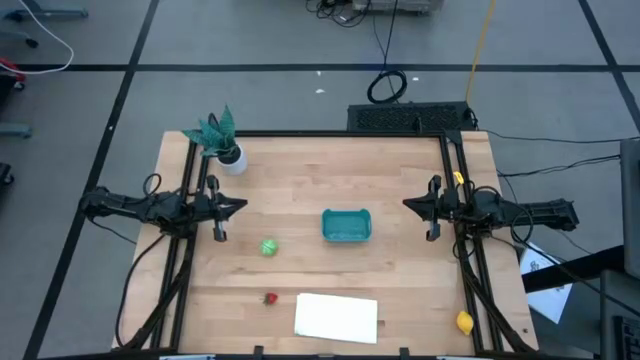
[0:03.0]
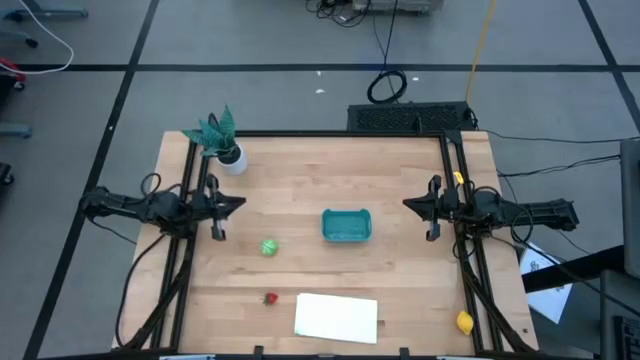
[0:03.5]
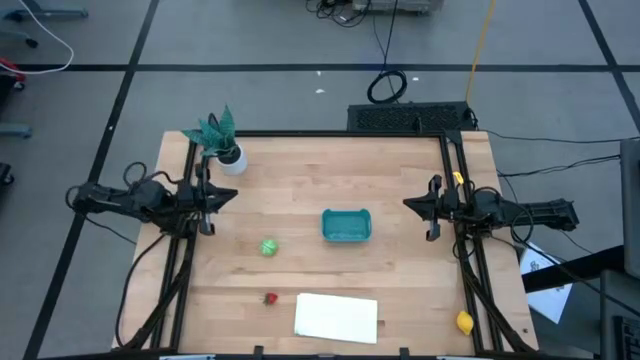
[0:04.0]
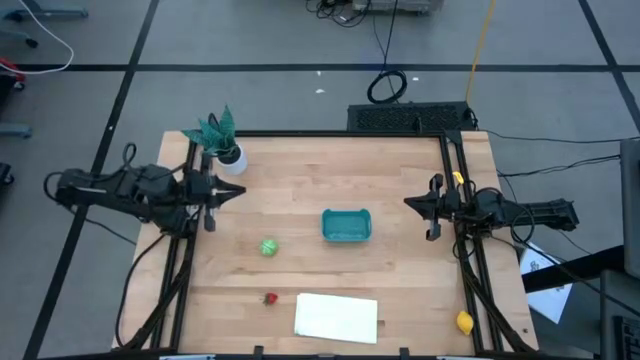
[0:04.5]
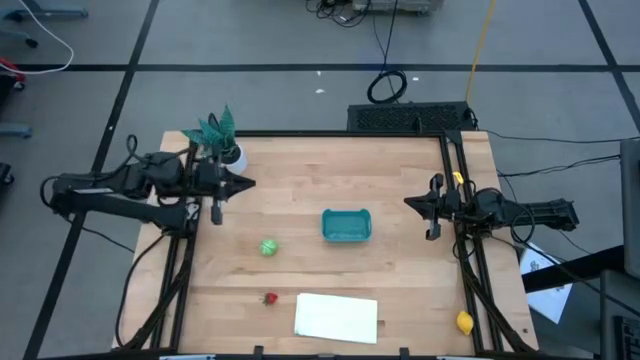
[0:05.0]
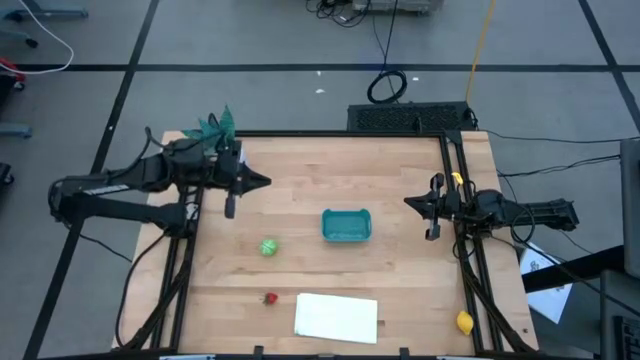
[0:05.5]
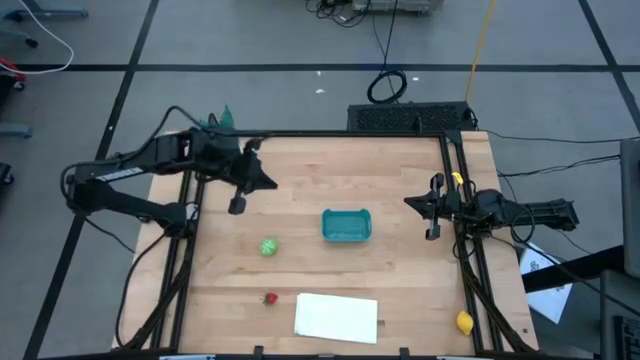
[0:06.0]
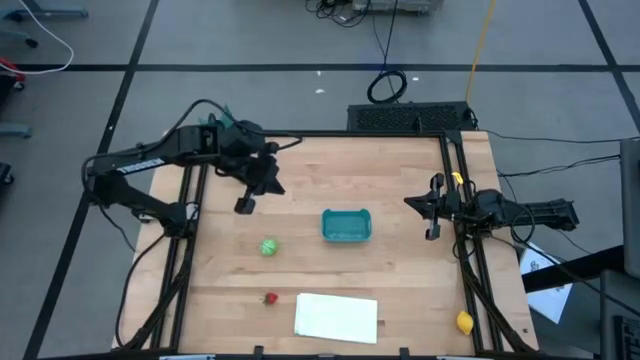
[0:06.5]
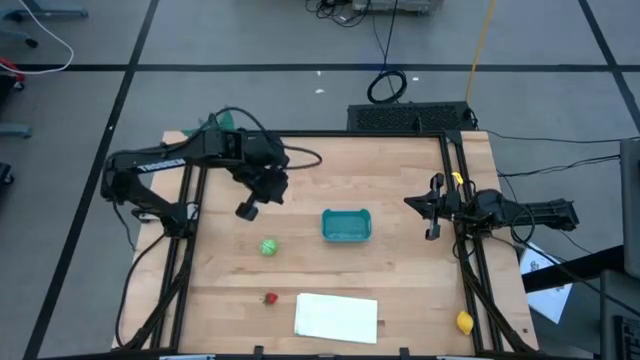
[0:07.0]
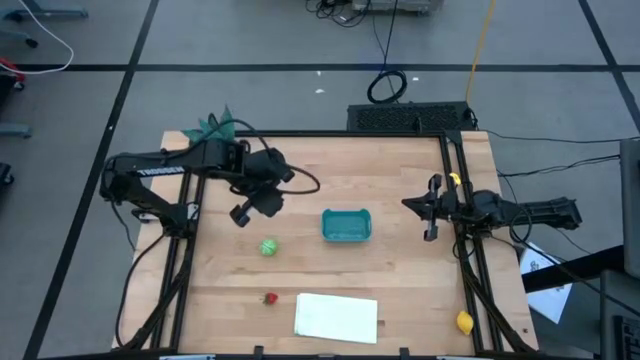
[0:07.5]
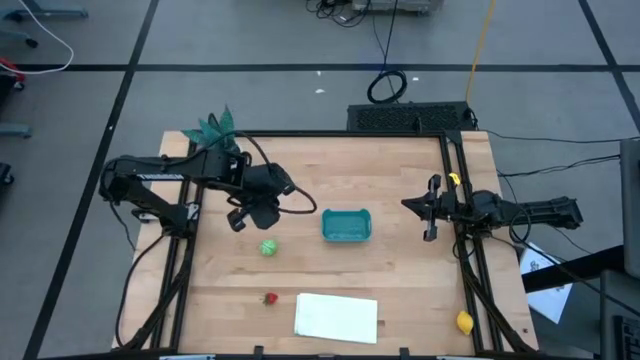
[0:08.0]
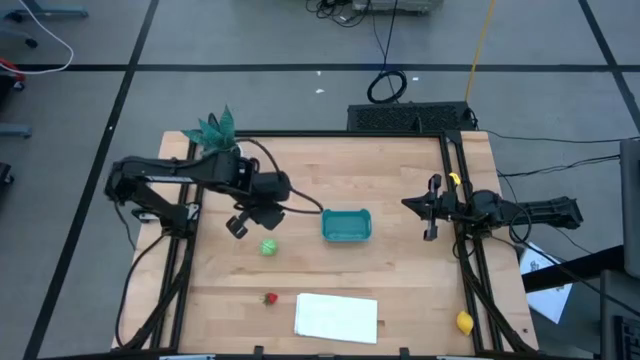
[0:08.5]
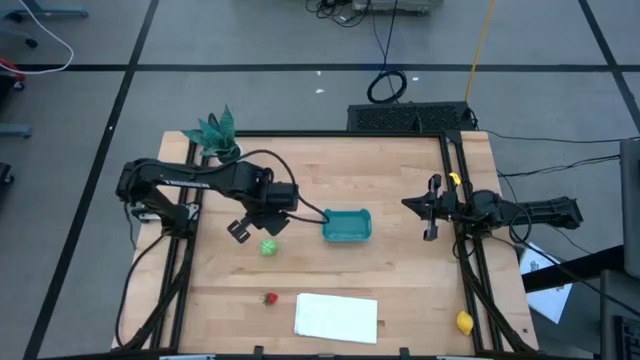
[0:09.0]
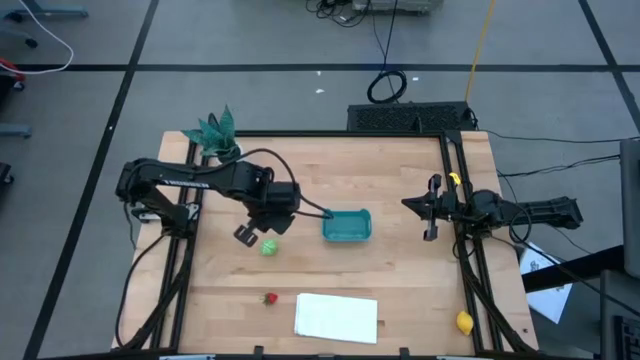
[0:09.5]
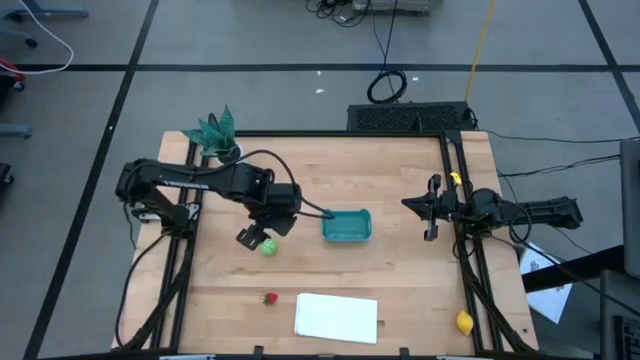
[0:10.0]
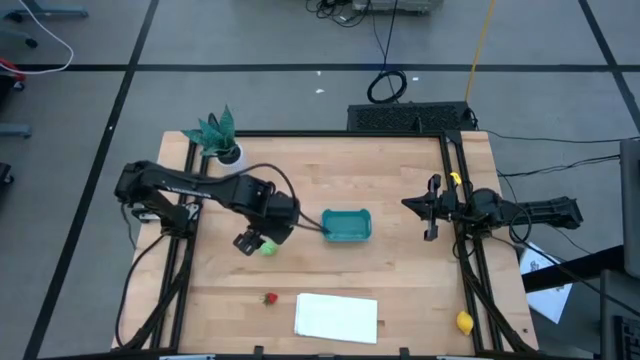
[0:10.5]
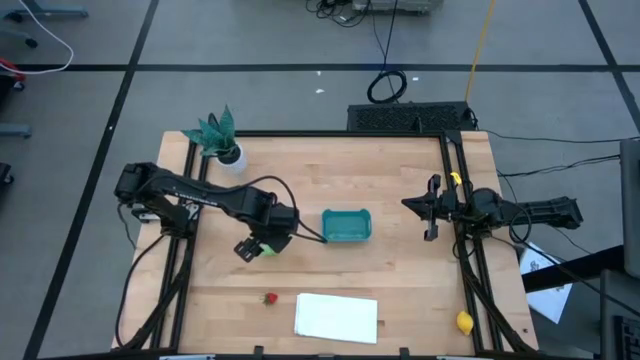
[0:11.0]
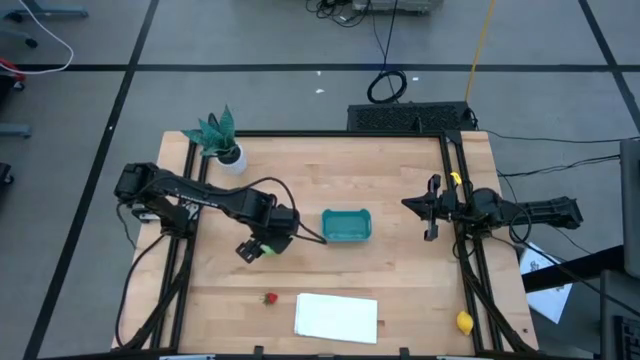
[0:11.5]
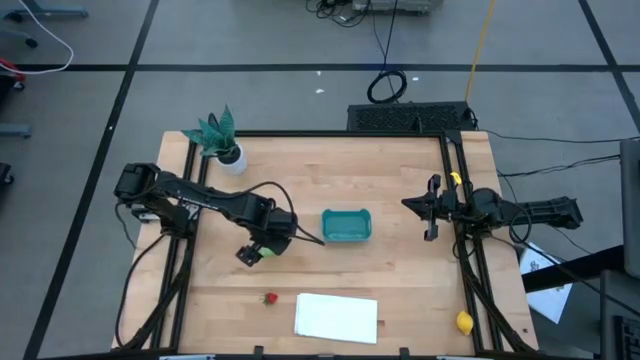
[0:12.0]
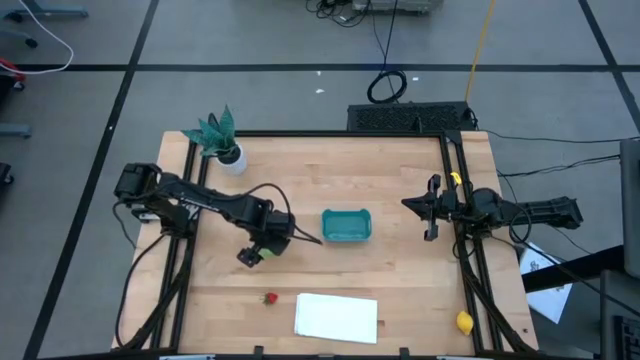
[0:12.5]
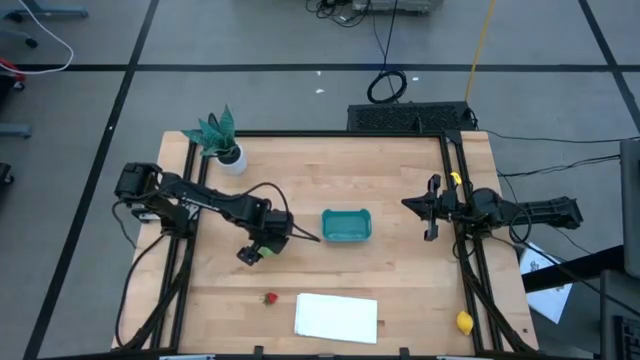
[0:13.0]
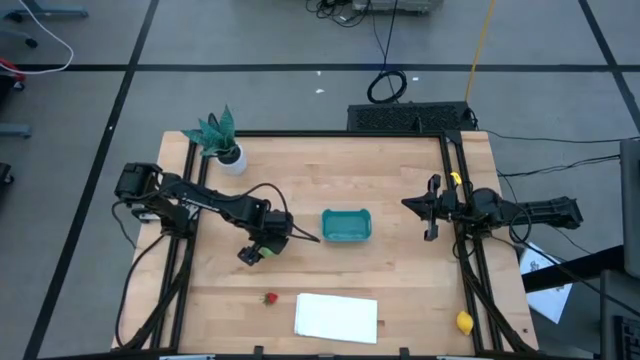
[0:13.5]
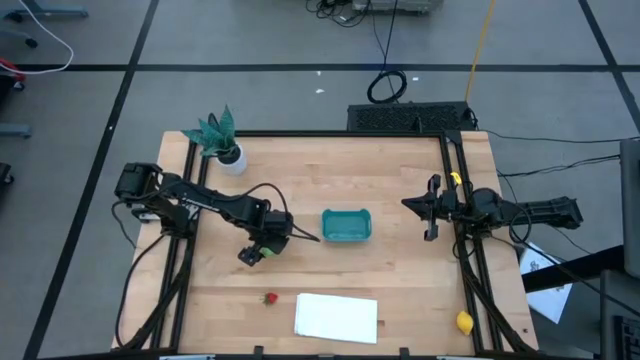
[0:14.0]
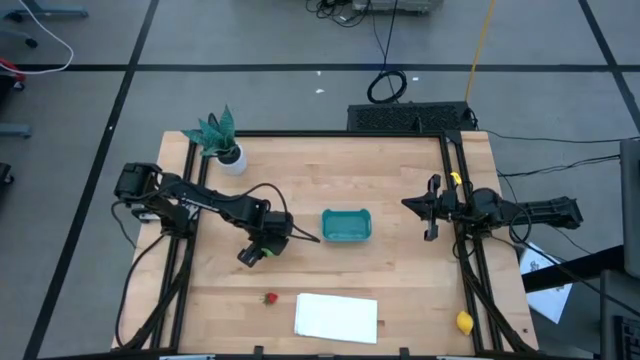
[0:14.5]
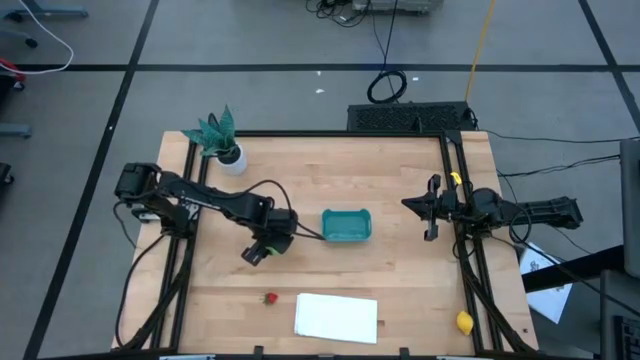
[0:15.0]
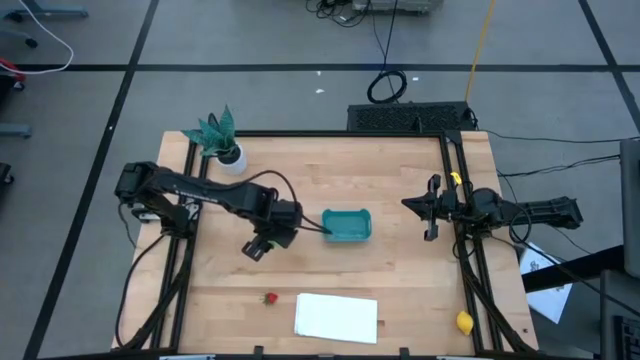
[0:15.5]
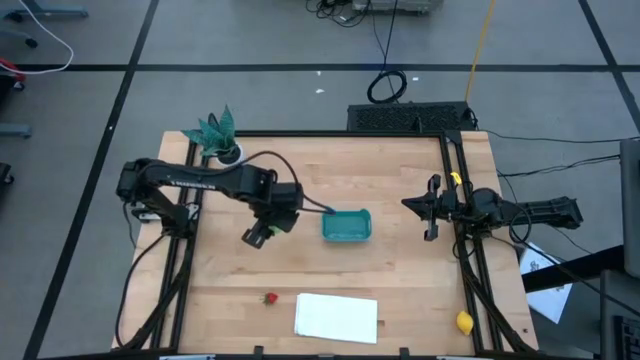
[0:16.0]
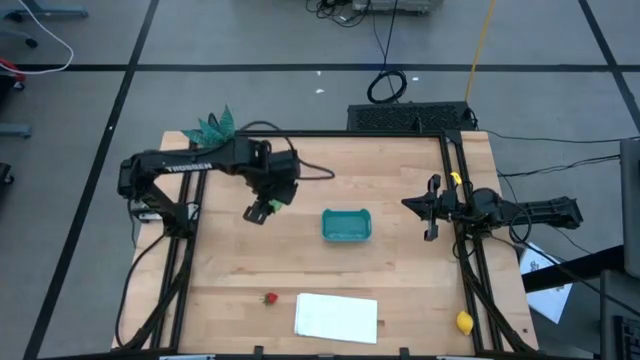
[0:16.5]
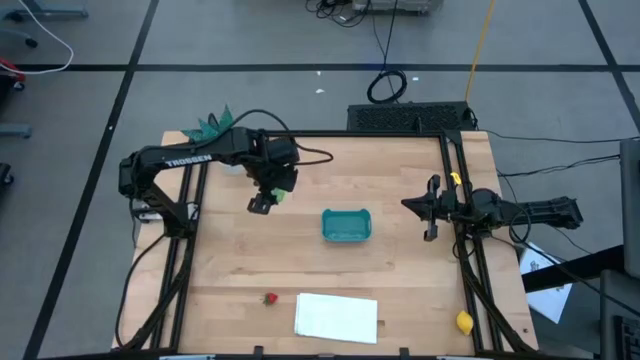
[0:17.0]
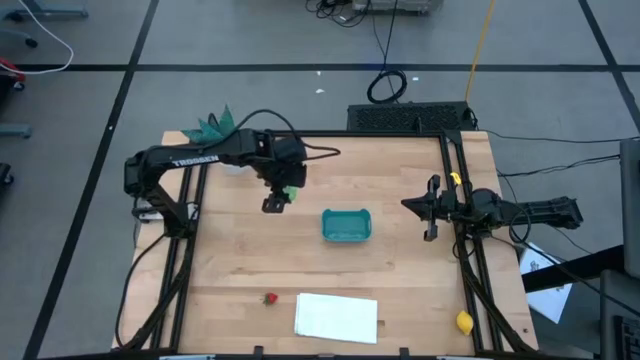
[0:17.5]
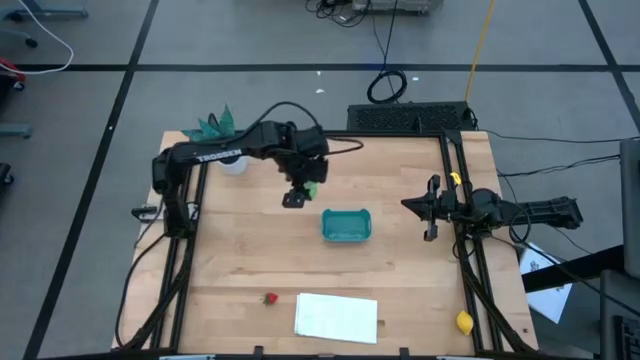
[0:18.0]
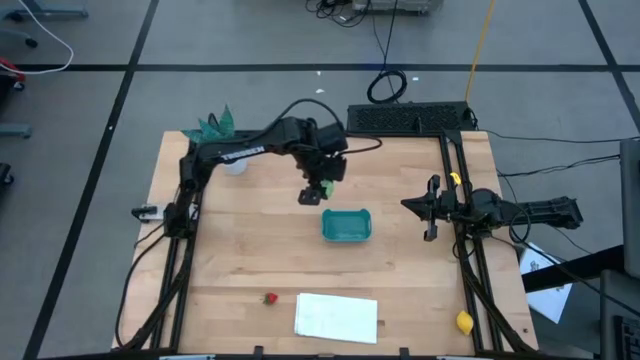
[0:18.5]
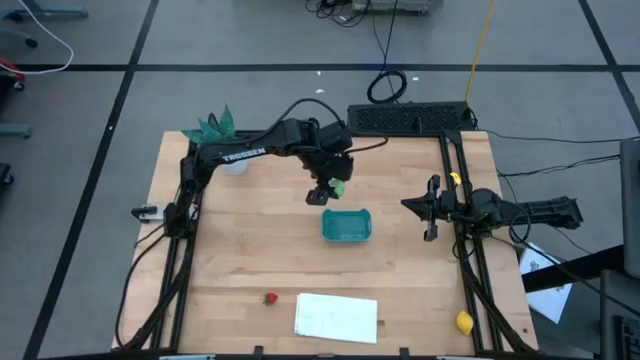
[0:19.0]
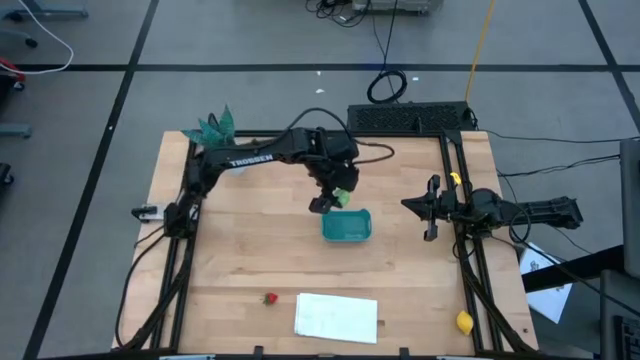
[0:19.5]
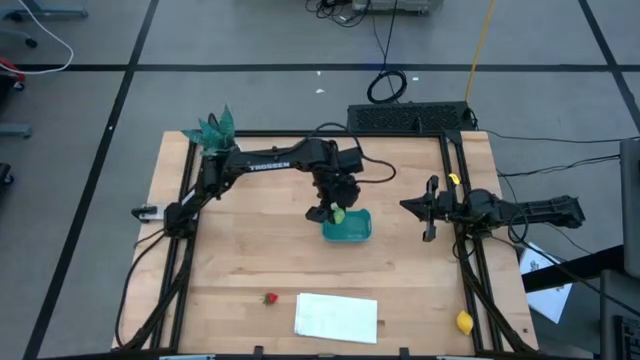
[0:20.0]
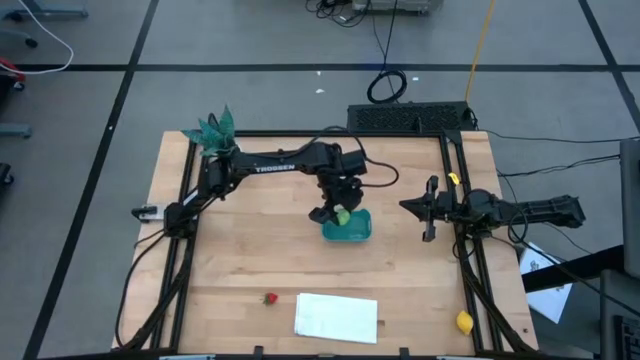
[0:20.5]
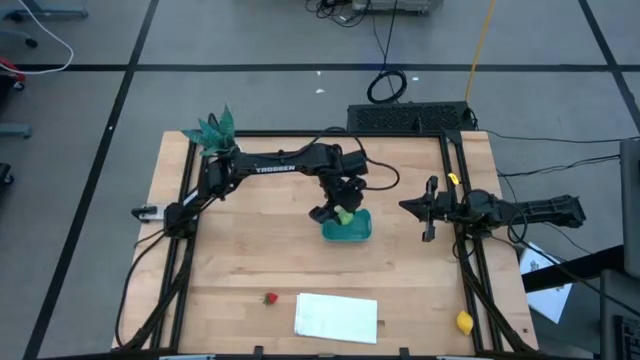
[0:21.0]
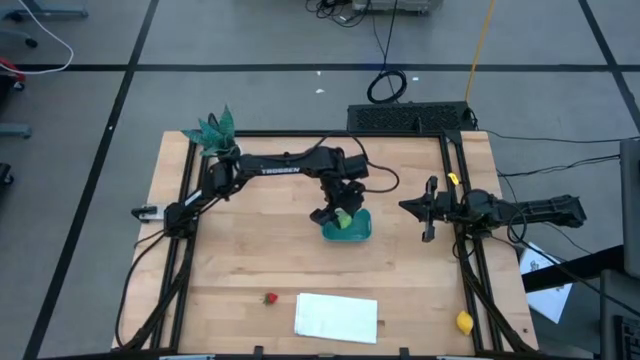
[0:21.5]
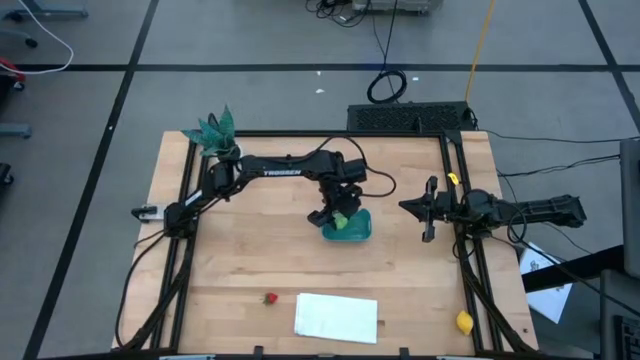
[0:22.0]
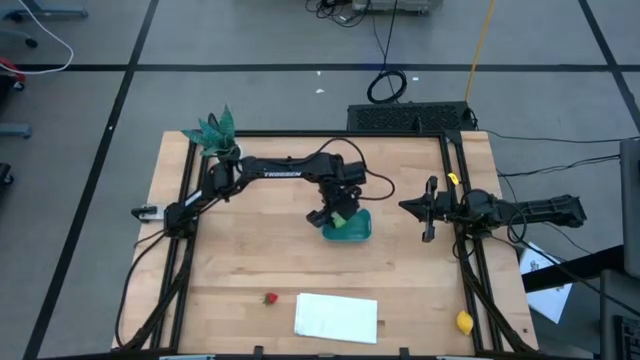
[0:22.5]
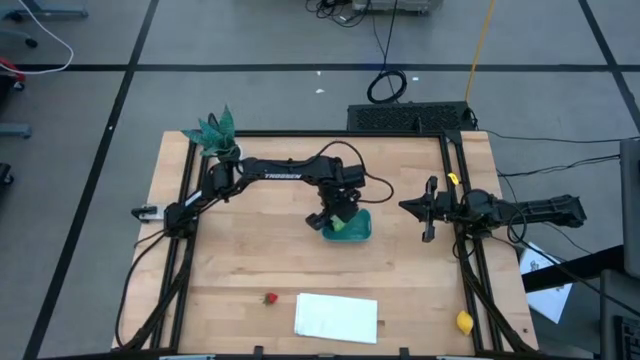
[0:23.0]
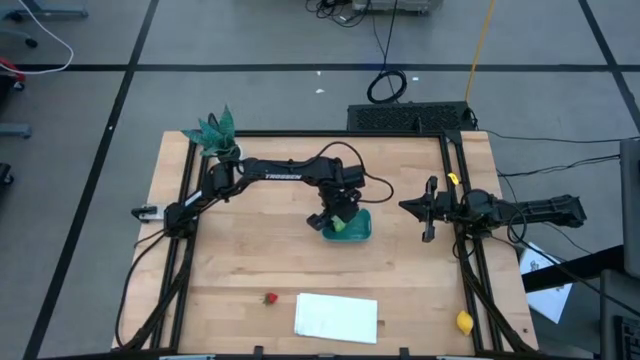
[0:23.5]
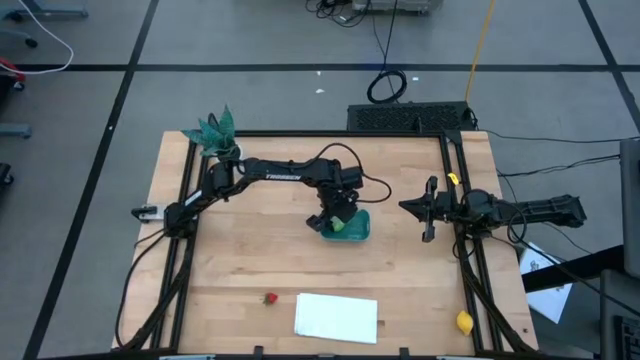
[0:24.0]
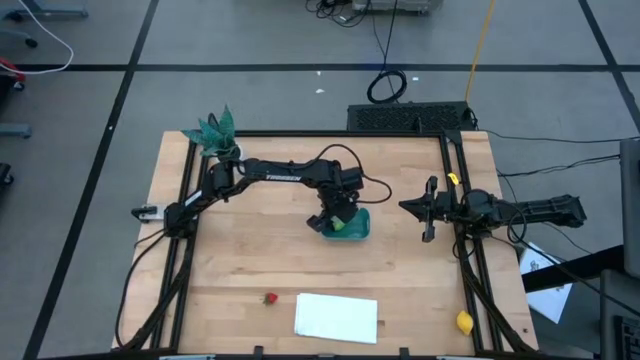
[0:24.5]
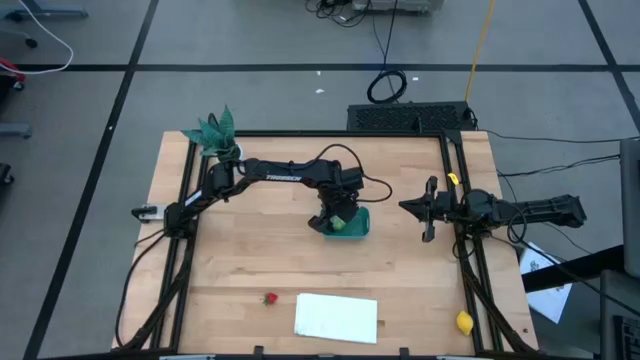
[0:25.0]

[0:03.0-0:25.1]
Task: Pick and placing Produce into tupperware
Put the cabbage into the bin
